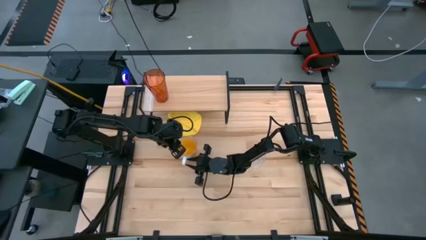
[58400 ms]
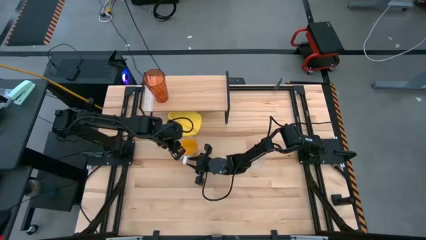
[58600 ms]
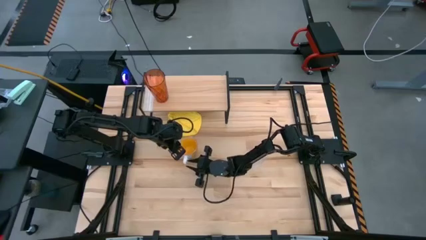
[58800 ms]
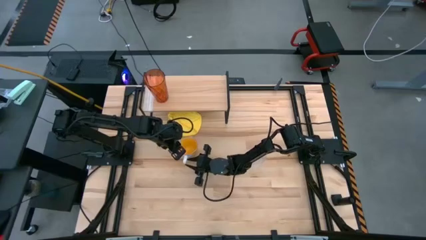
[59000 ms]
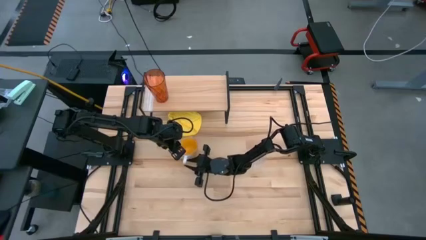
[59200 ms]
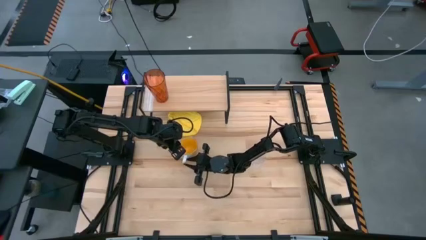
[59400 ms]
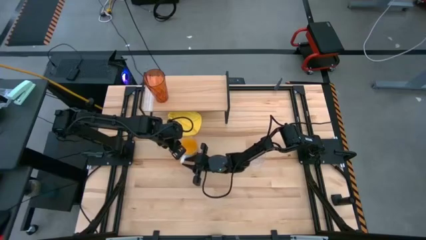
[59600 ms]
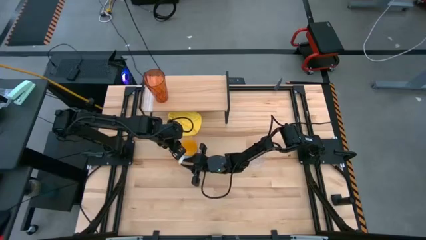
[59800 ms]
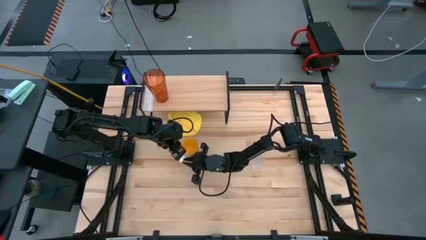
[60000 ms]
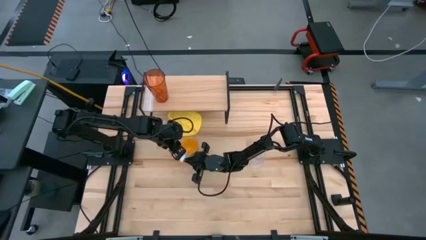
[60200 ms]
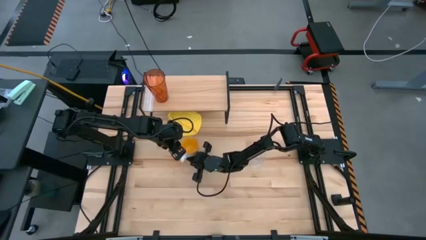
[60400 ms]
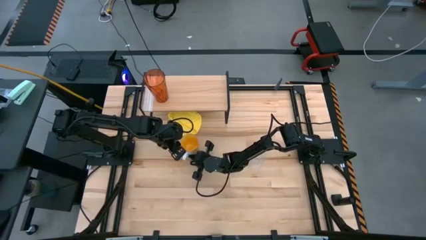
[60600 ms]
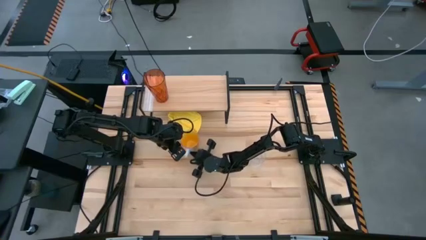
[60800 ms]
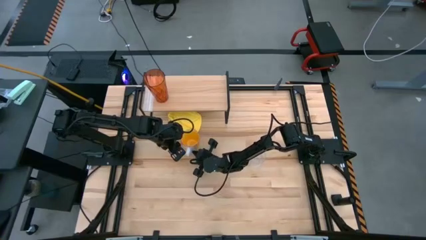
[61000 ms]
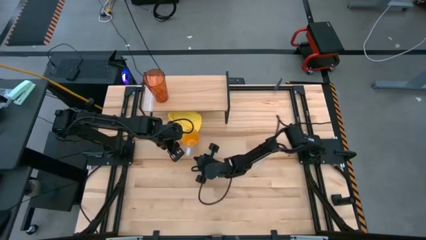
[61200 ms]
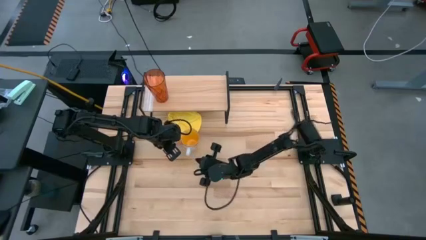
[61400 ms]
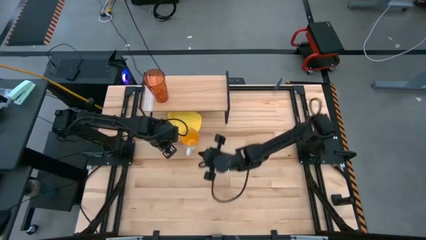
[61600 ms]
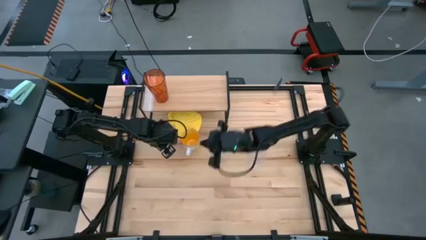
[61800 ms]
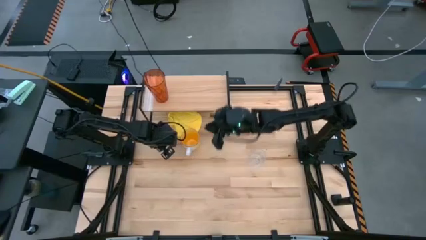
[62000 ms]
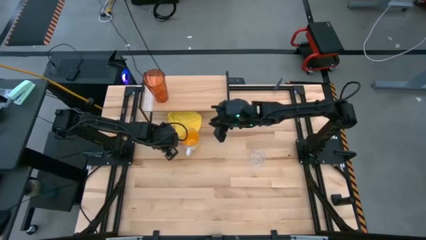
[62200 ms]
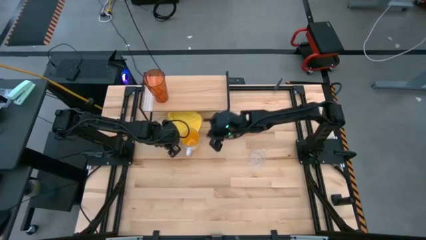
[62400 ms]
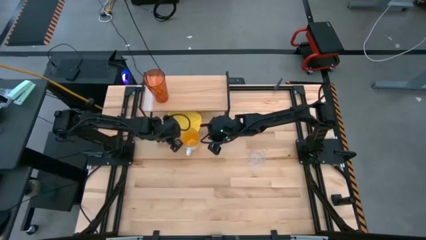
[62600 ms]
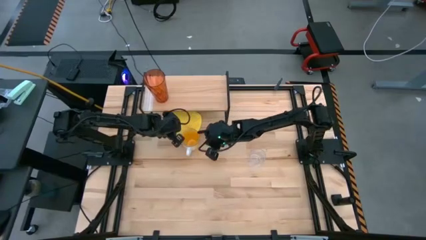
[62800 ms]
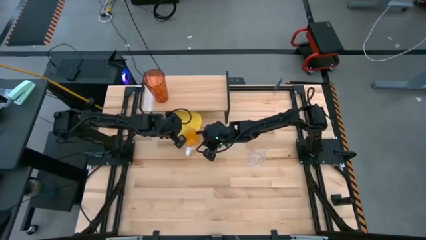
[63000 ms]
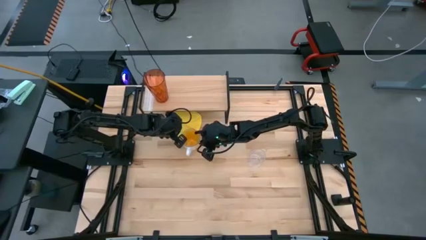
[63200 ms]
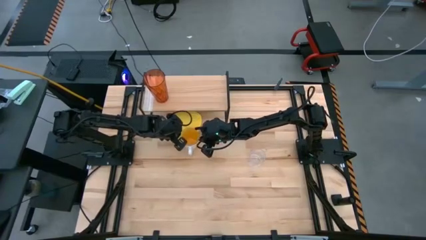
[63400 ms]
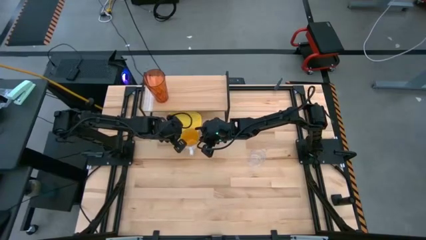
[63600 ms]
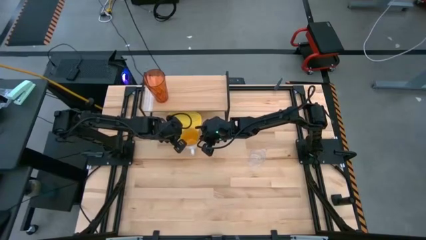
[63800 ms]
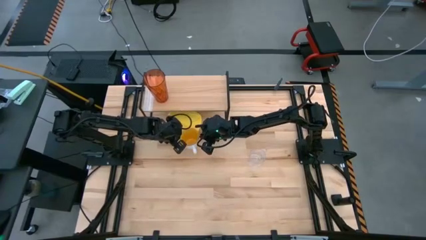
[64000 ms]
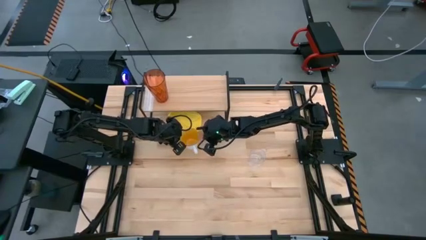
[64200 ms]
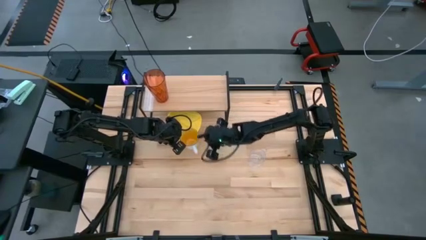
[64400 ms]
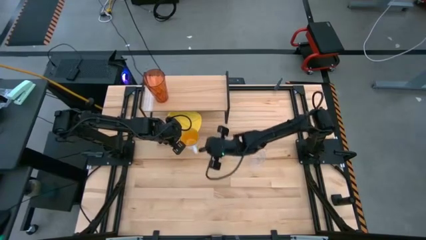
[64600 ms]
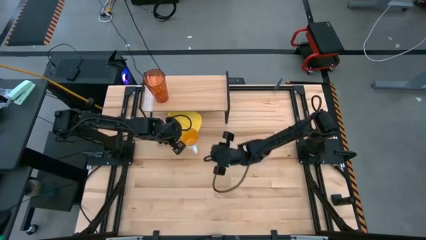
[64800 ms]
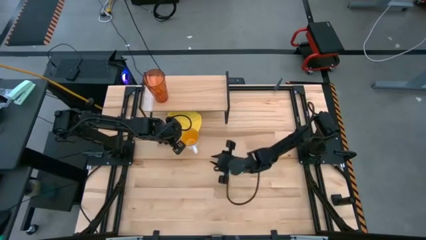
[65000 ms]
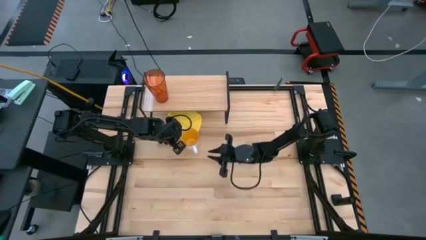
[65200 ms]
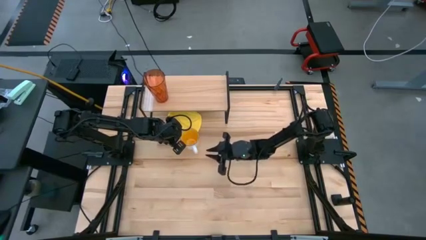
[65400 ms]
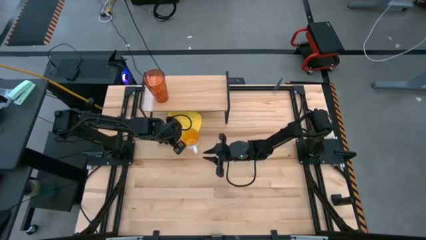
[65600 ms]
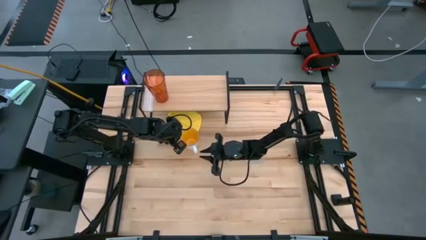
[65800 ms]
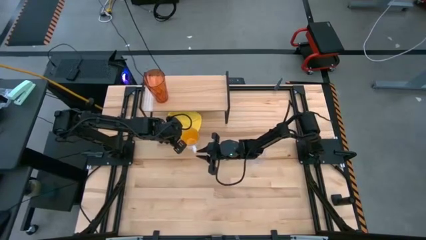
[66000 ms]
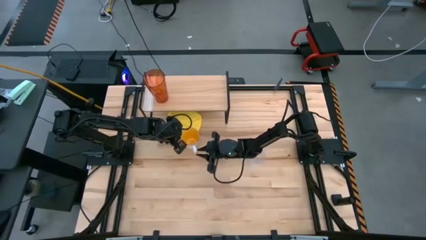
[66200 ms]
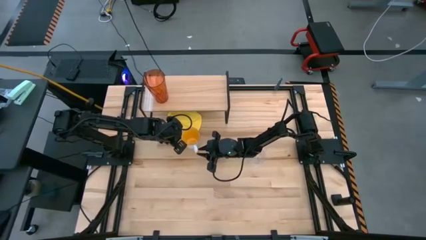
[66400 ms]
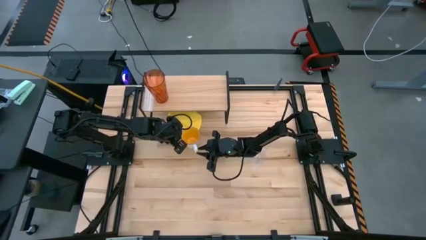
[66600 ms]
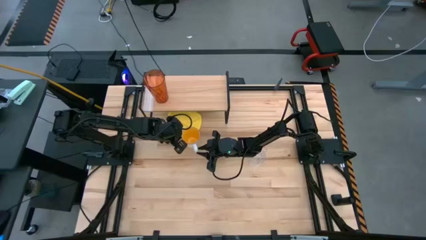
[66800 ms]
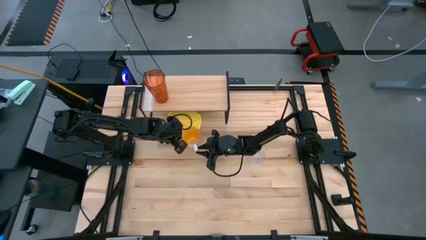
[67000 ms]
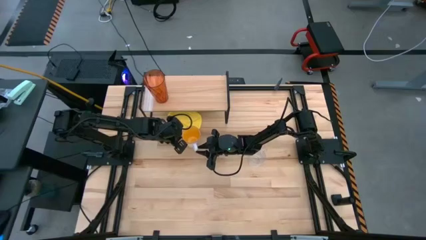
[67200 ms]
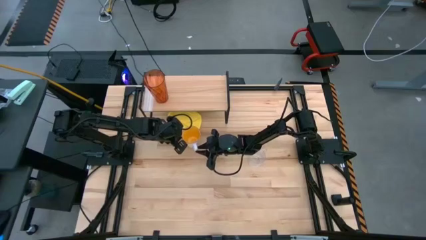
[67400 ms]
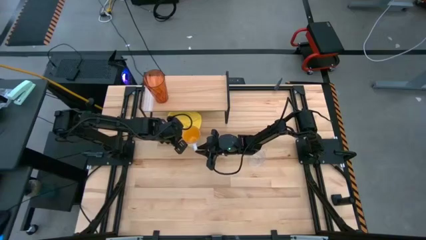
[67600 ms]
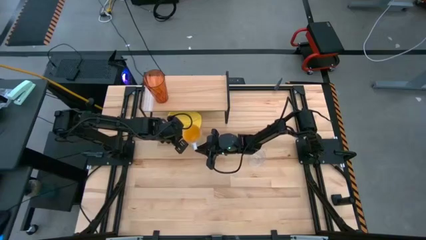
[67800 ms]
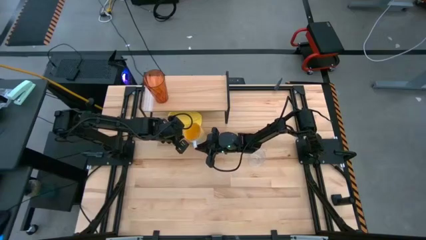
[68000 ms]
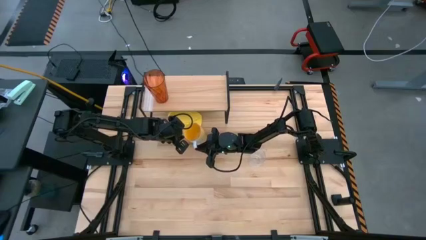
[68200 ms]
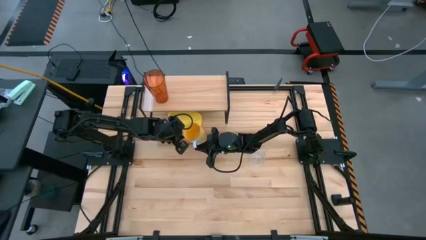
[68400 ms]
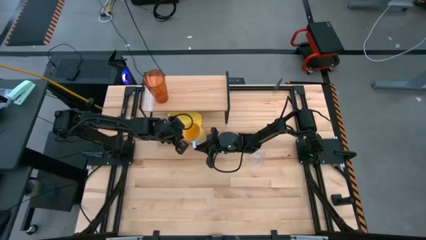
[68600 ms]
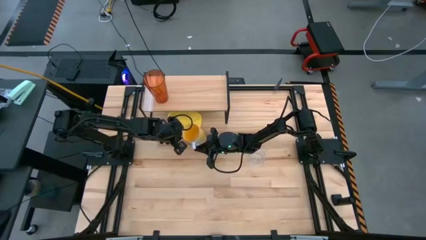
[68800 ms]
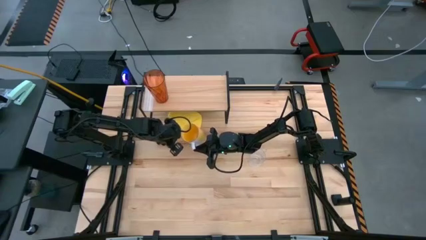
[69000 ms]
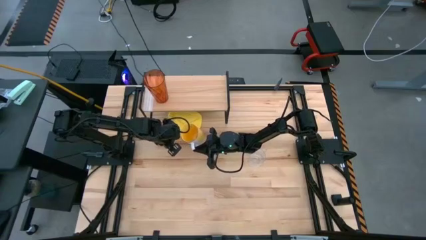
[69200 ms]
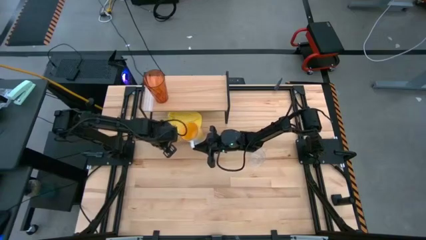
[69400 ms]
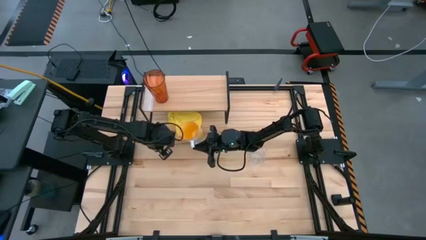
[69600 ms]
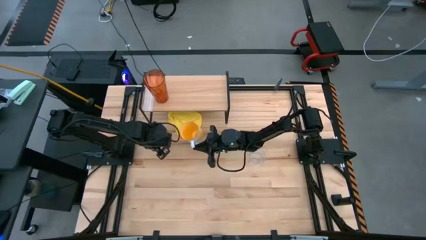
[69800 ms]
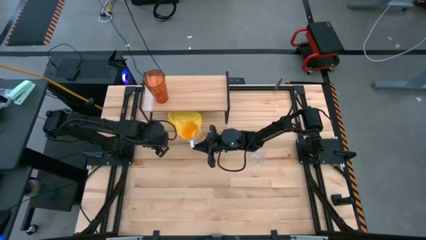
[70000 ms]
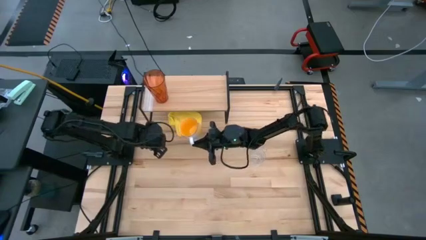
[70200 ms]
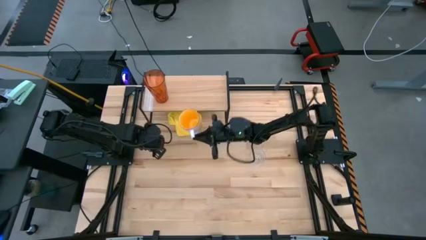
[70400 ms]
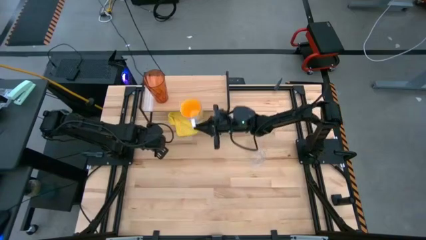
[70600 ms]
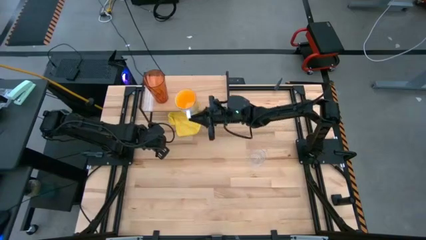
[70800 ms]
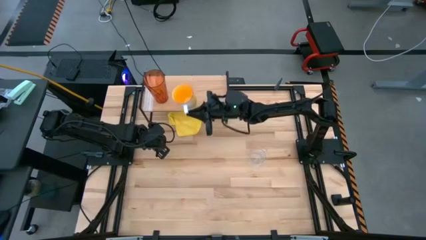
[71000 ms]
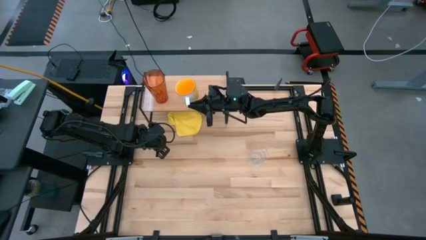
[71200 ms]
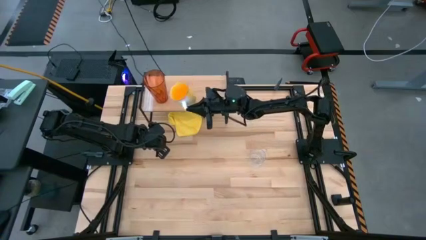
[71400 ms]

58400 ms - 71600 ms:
Task: Stack small to large cups/mugs on shelf
Put the yellow mug on the shelf

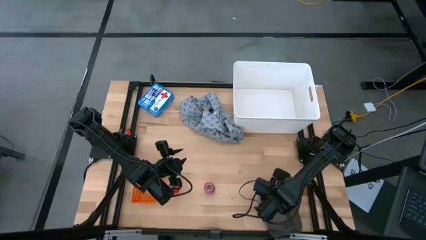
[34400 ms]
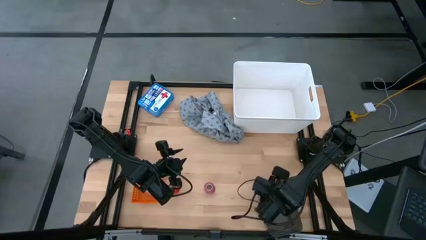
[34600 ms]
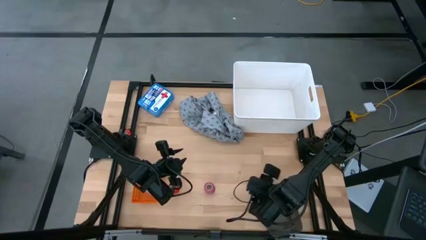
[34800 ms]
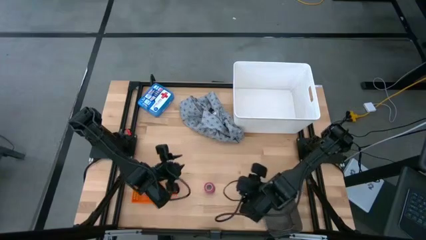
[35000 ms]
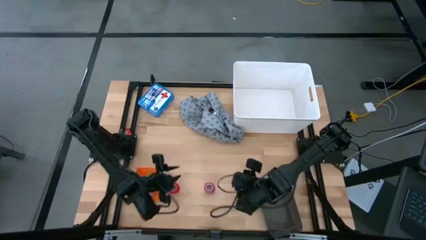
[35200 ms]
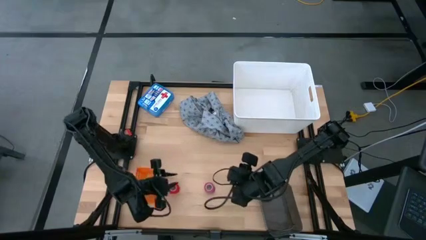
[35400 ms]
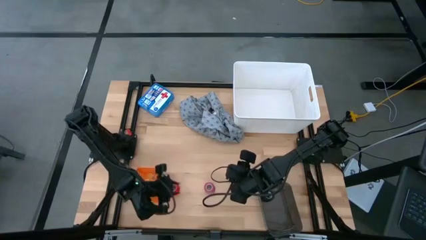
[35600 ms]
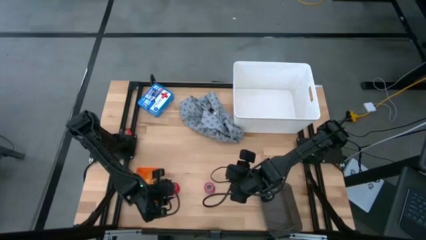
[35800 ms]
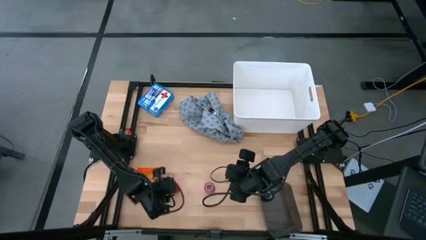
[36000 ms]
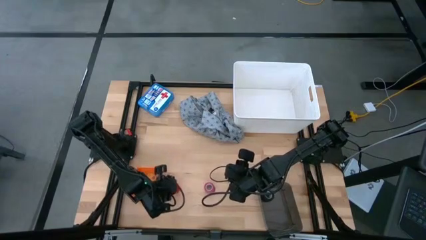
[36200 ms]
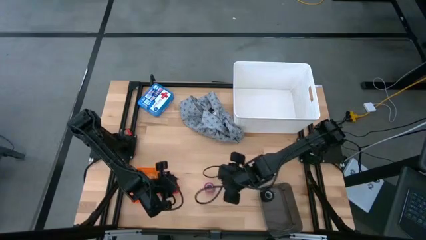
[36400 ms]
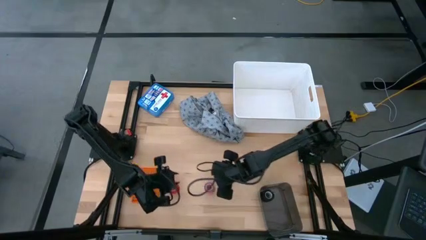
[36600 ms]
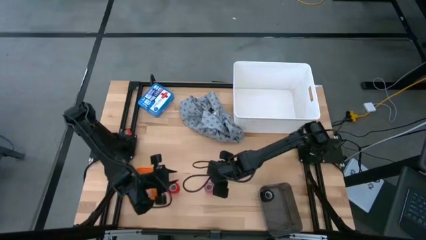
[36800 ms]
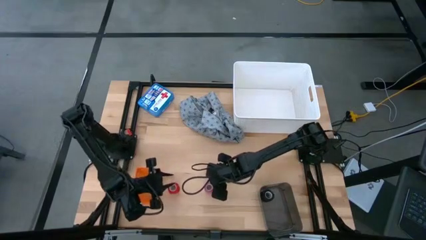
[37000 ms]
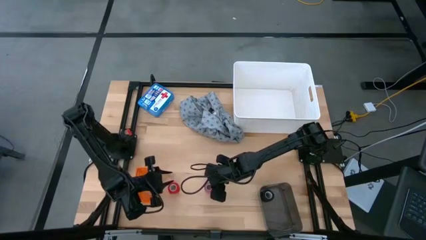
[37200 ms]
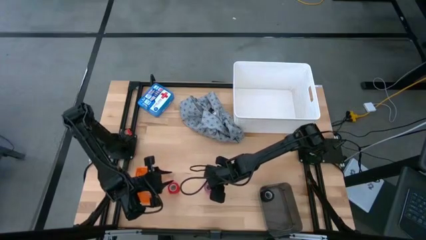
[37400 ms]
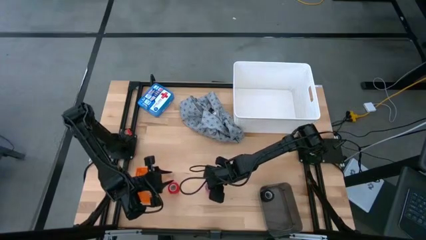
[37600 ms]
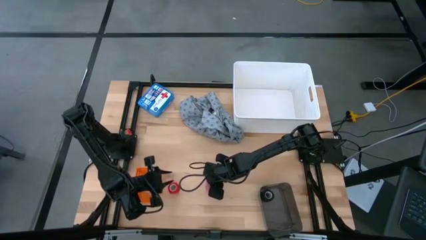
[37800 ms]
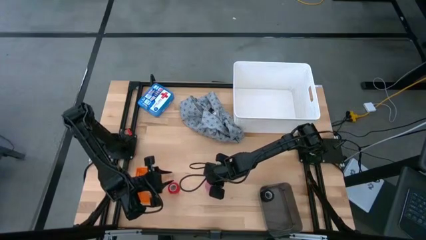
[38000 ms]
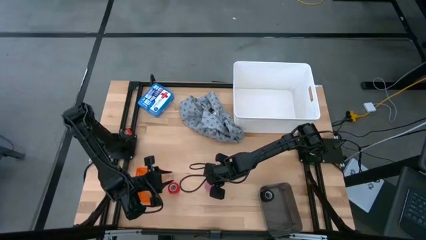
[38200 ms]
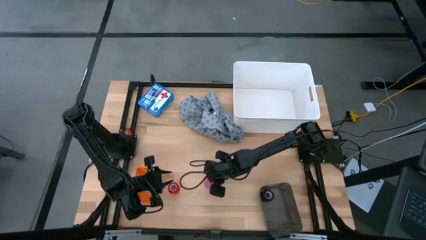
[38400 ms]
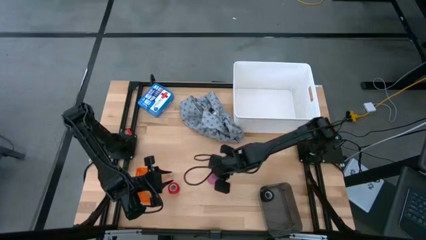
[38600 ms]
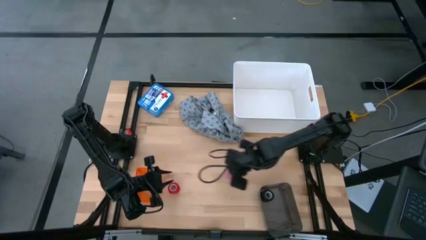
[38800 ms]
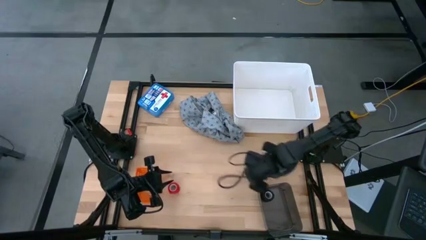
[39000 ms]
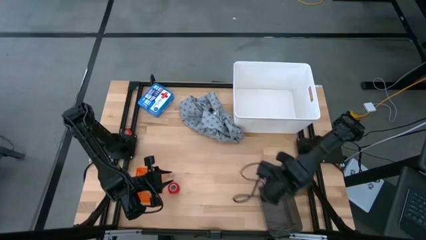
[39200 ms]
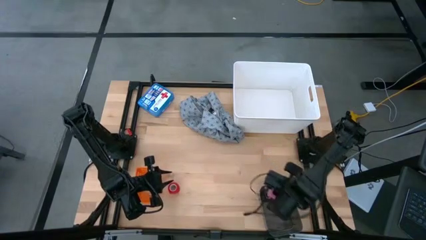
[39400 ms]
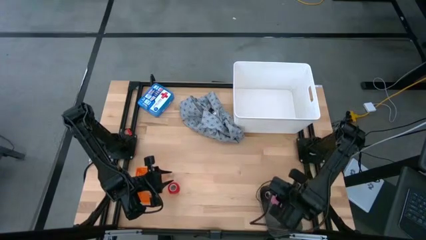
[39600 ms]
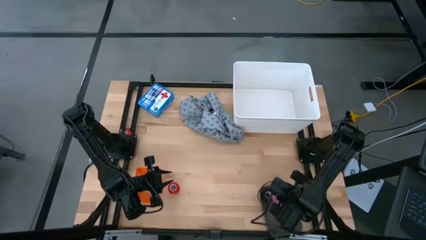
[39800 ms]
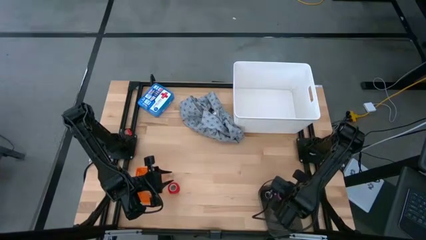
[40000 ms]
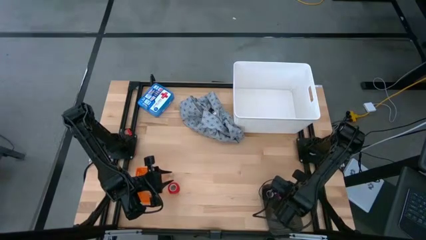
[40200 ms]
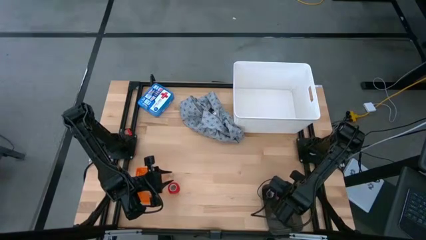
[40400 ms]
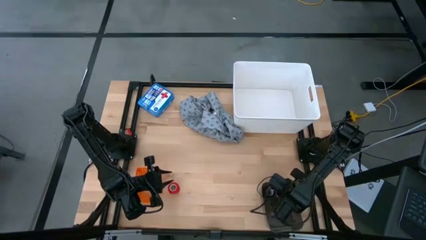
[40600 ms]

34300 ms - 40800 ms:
Task: Pick & place medical supplies in basket/bin
Put the pink bandage into the black bin
